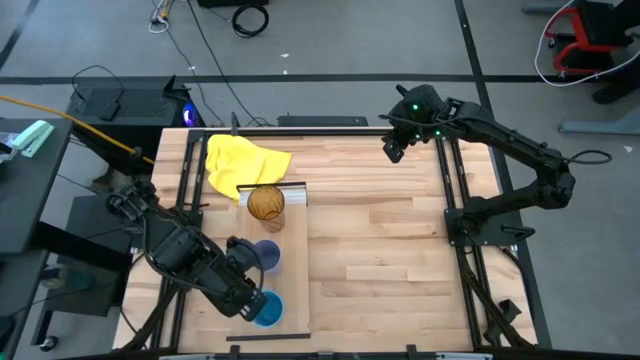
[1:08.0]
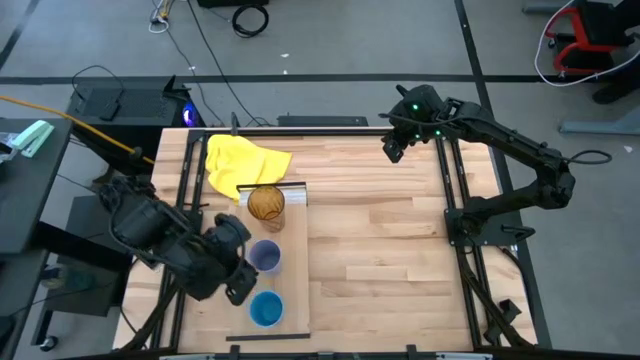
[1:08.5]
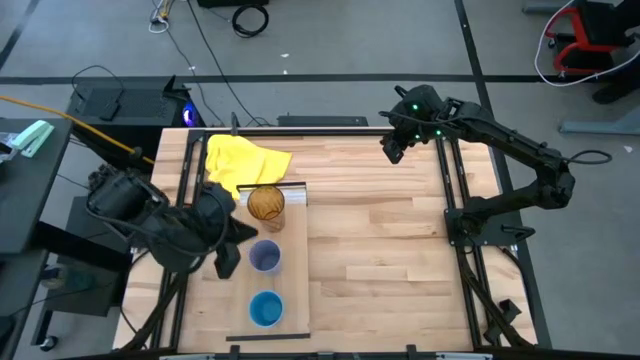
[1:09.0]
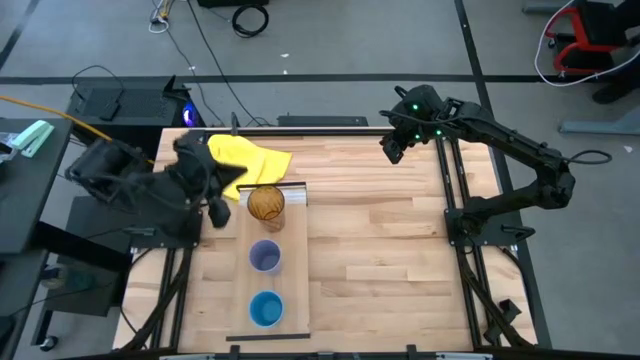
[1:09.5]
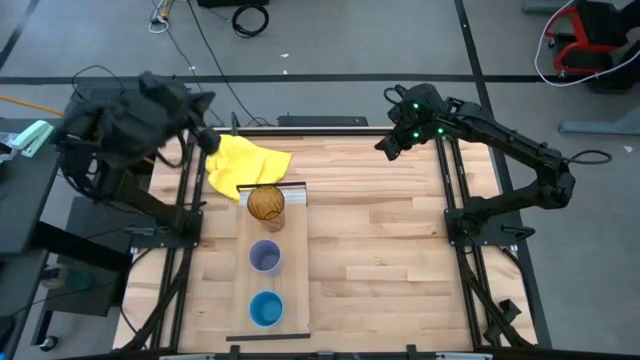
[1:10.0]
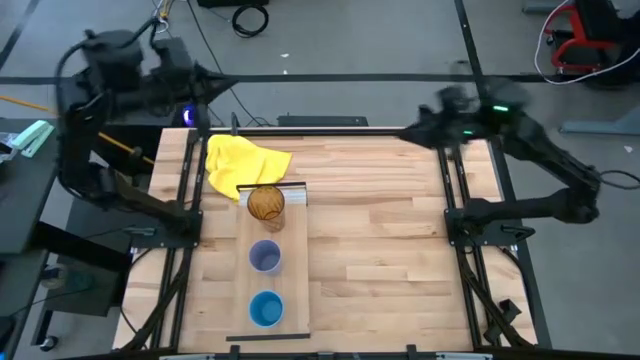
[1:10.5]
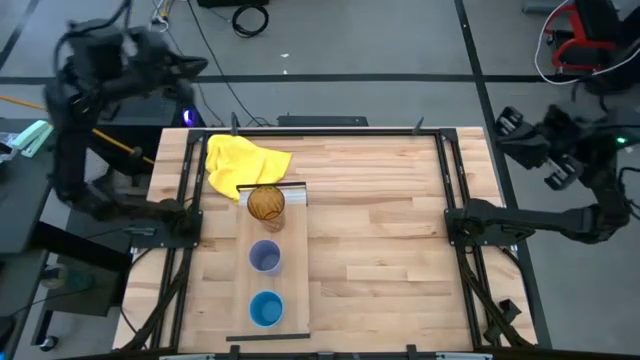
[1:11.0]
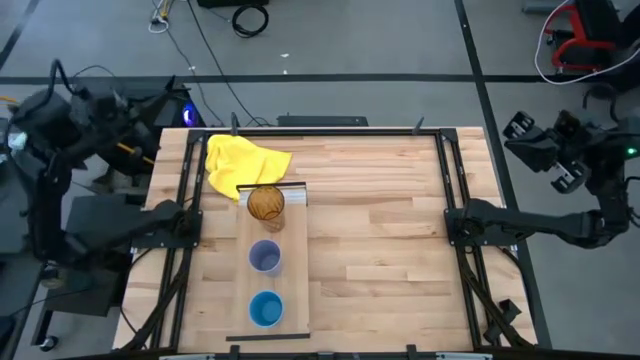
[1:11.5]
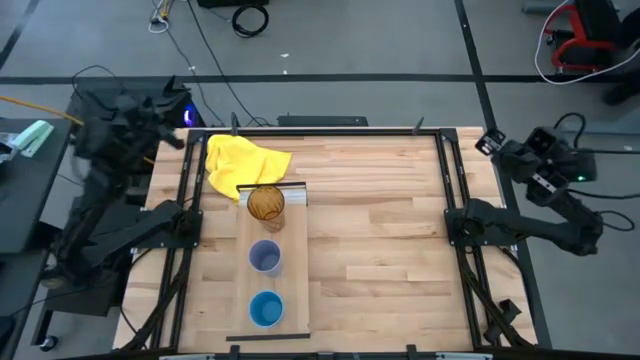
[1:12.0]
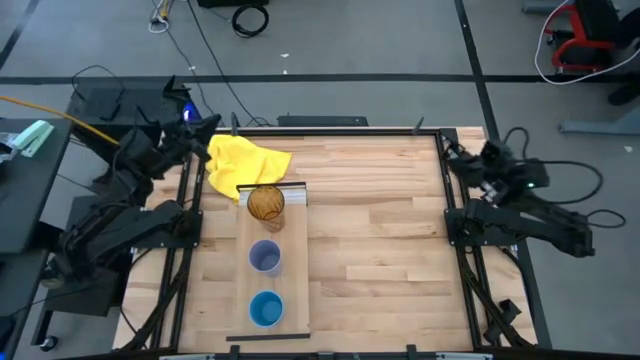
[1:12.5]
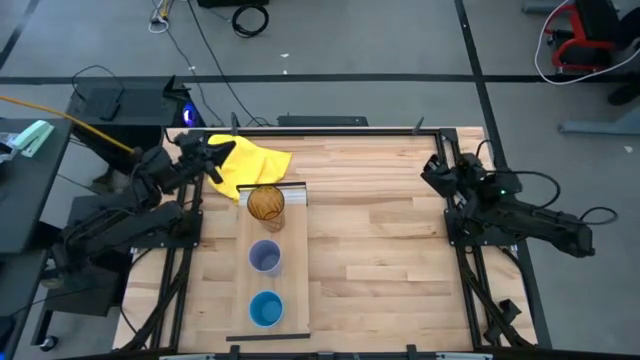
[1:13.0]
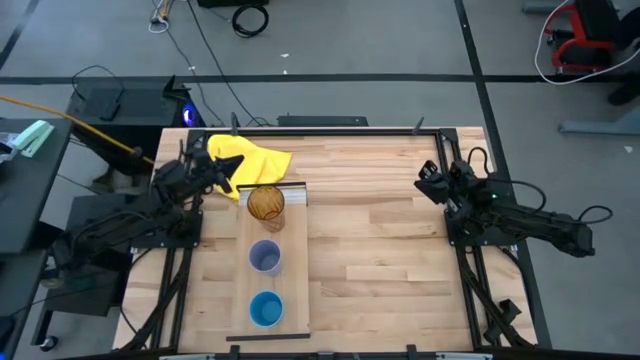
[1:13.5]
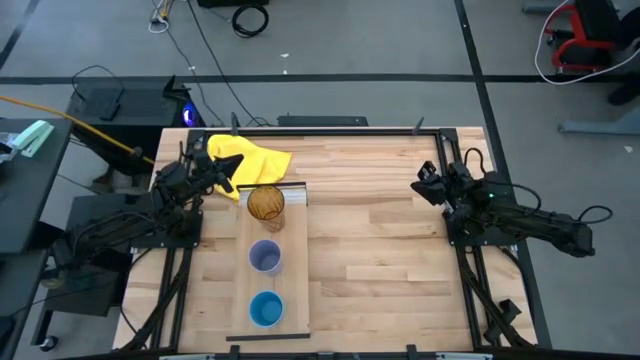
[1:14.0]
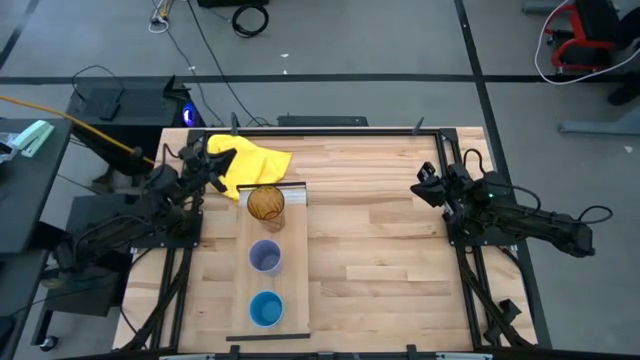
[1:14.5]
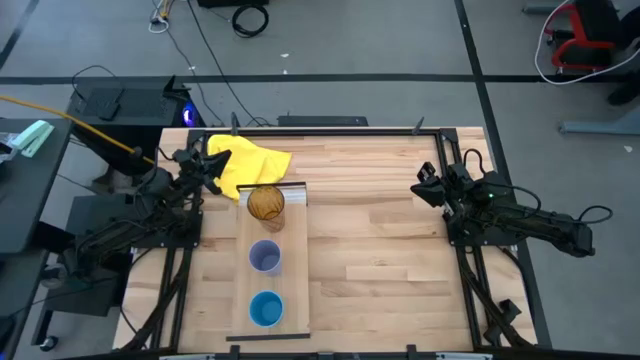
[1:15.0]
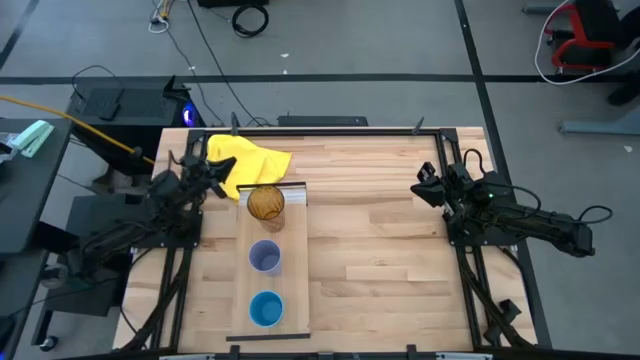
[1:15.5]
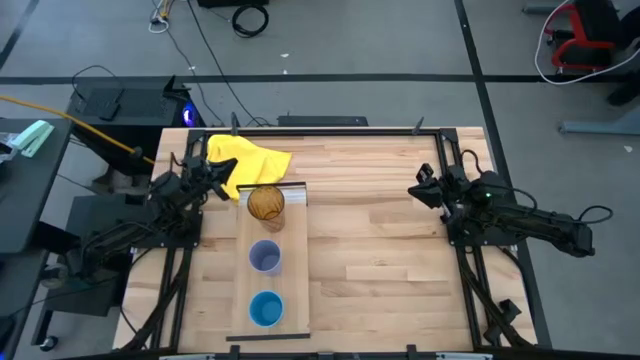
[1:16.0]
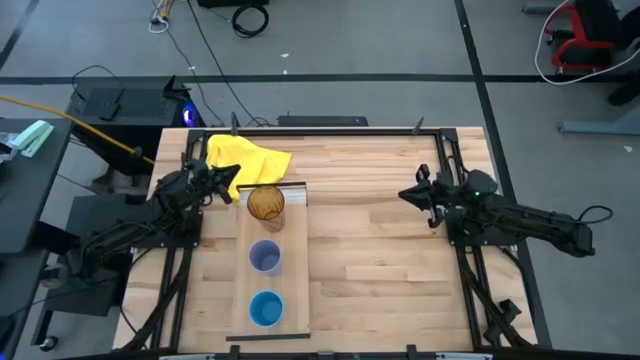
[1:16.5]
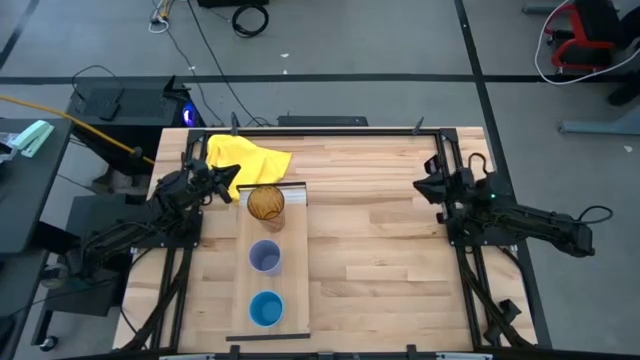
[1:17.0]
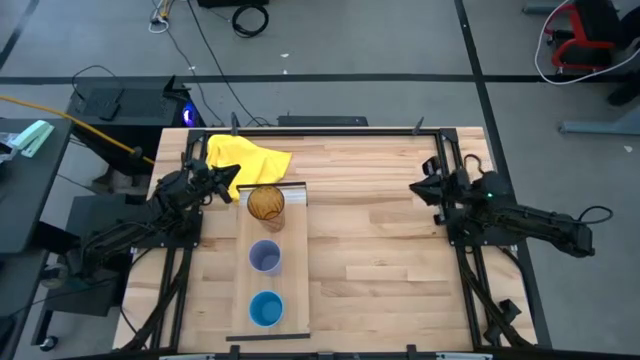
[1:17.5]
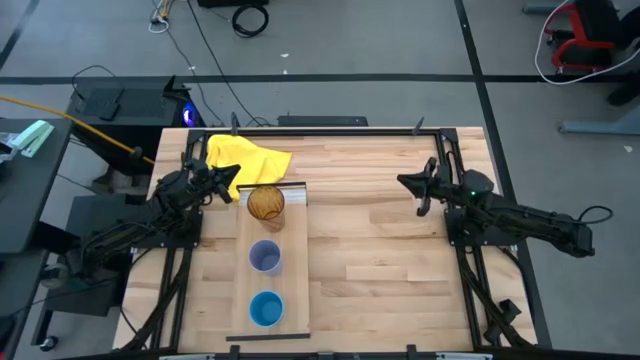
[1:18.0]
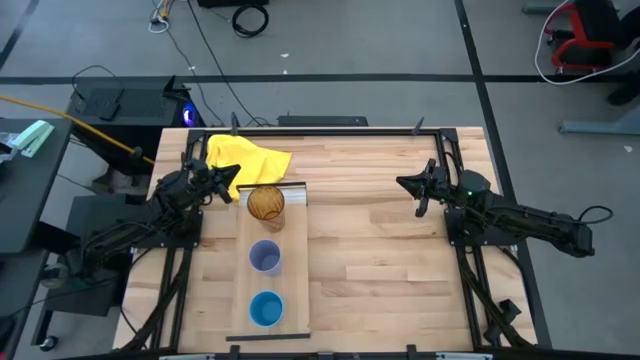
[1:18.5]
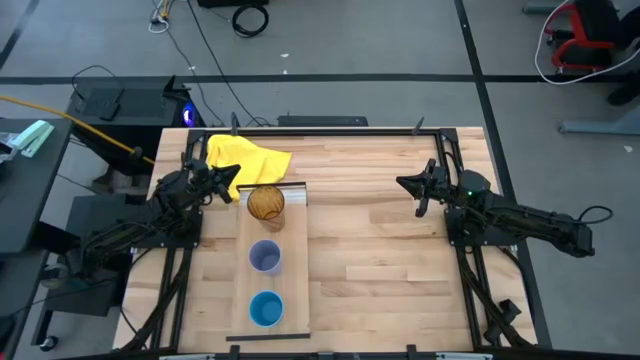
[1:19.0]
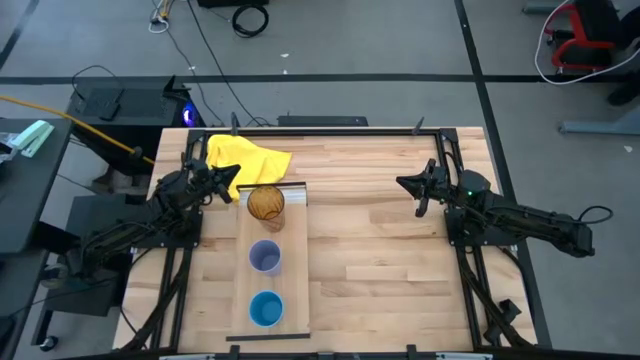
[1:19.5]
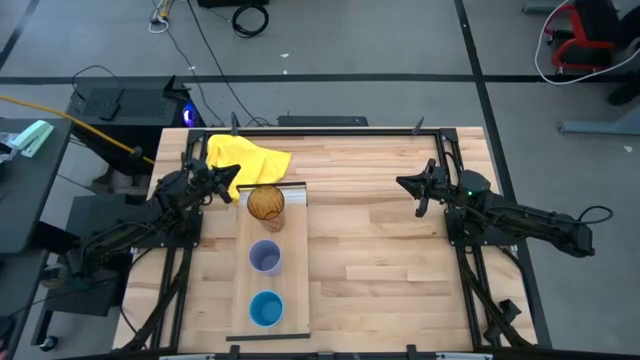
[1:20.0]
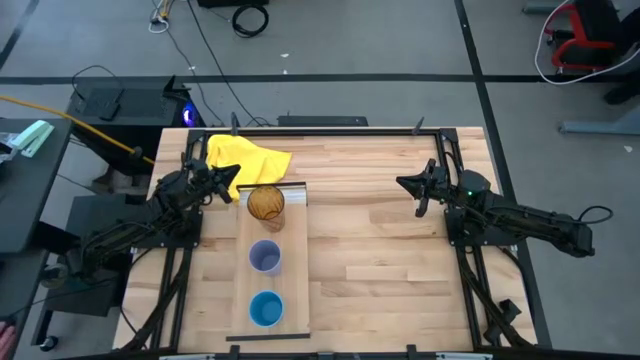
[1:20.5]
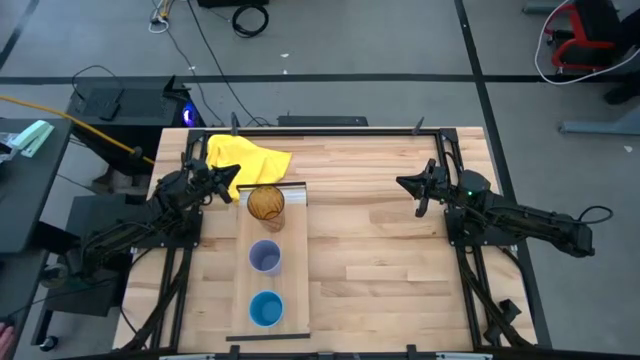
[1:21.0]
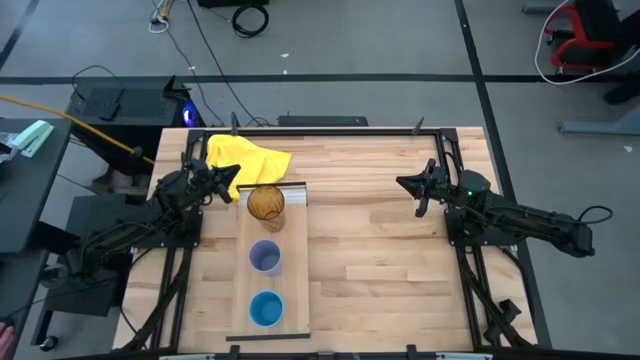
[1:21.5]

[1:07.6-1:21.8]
Task: Stack small to large cups/mugs on shelf
Return to Home Position
